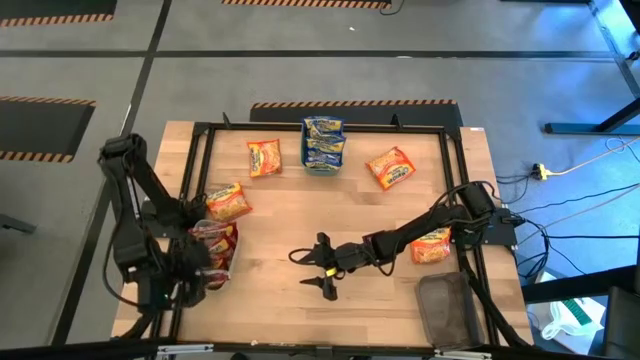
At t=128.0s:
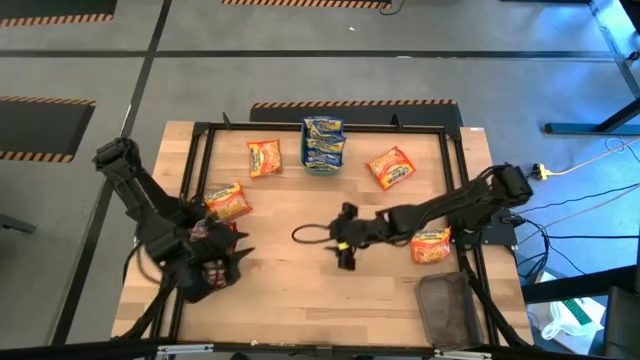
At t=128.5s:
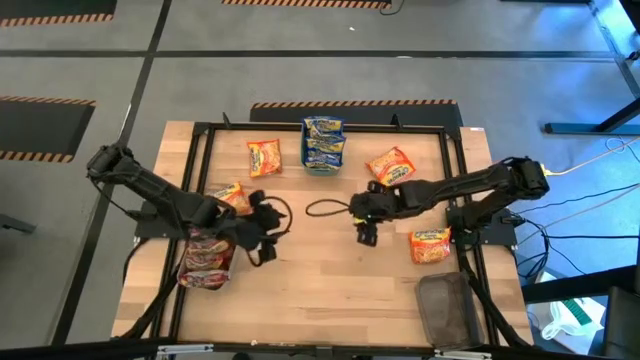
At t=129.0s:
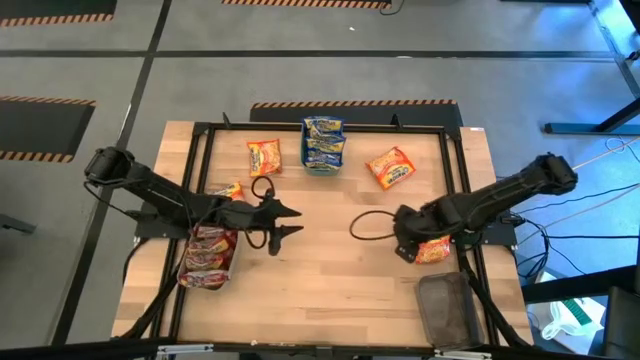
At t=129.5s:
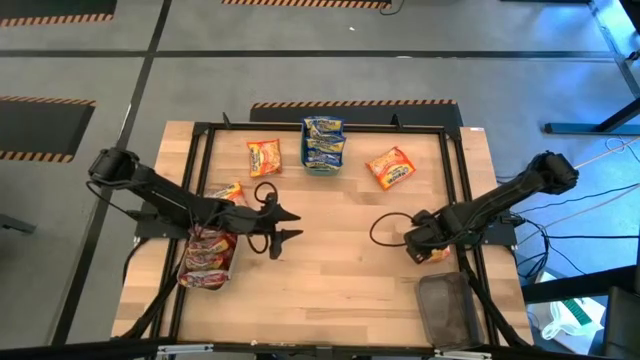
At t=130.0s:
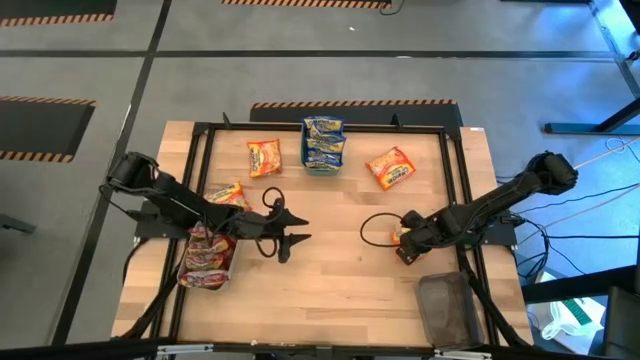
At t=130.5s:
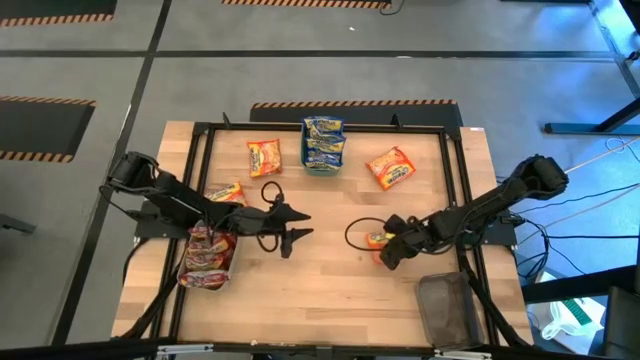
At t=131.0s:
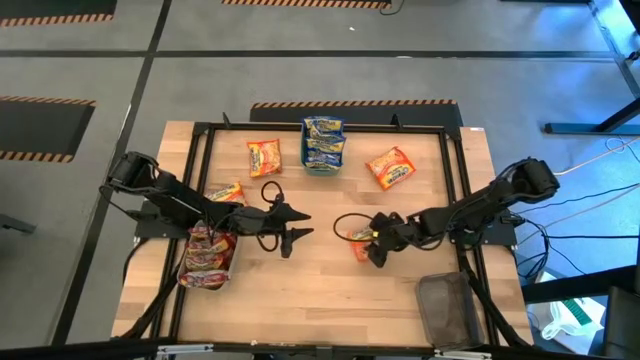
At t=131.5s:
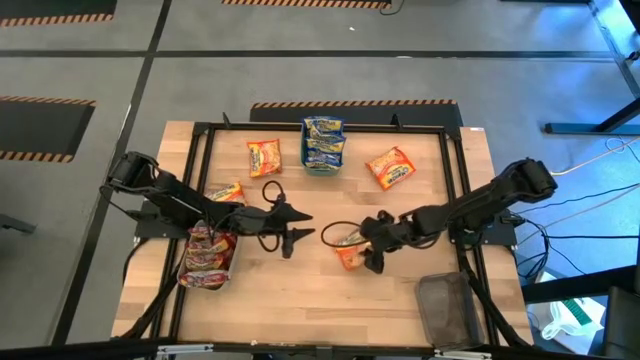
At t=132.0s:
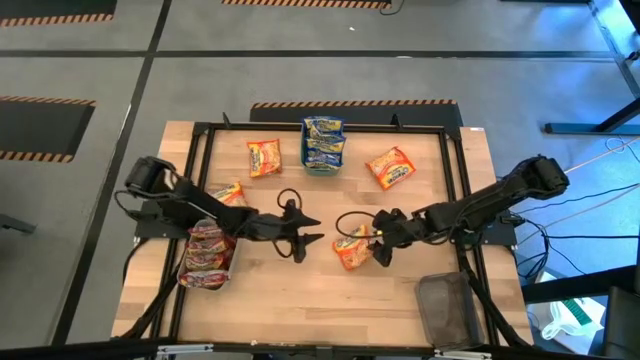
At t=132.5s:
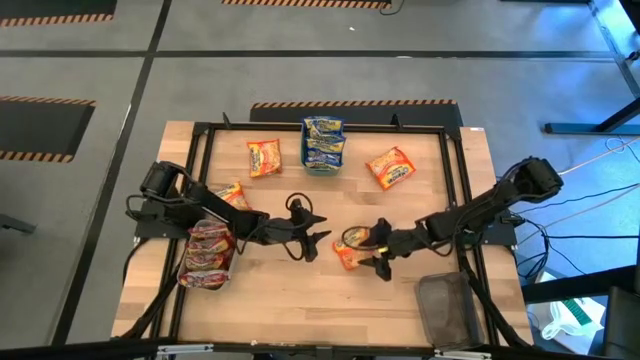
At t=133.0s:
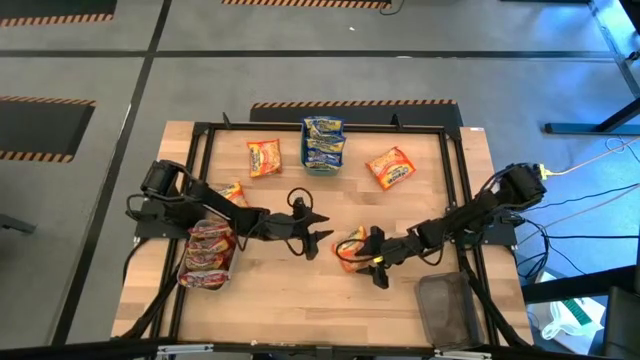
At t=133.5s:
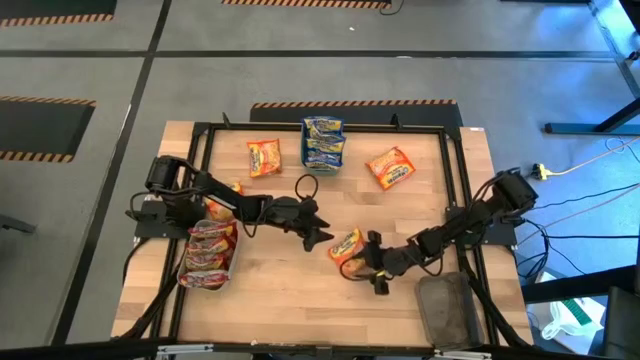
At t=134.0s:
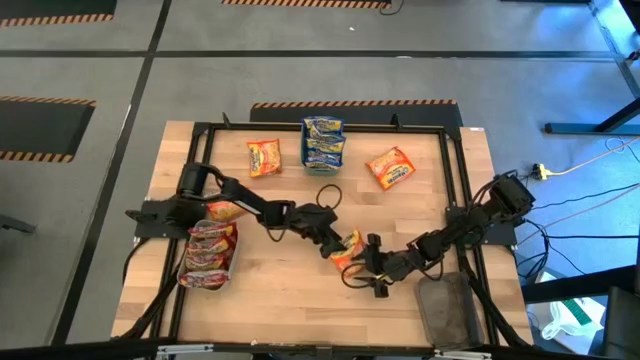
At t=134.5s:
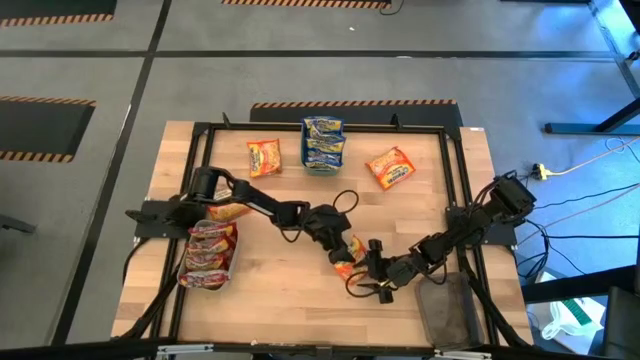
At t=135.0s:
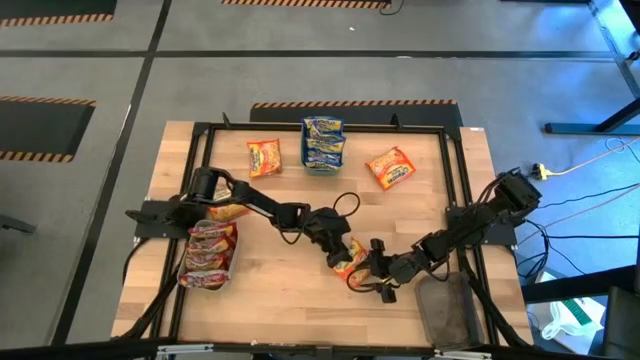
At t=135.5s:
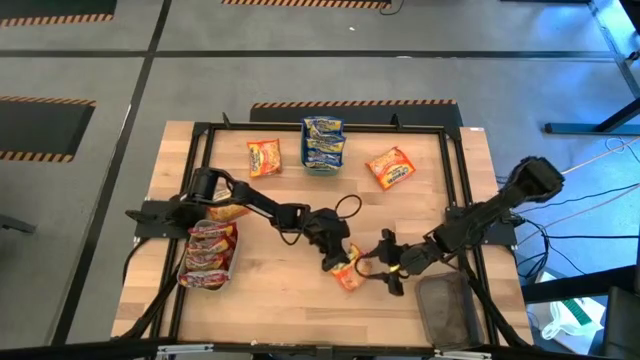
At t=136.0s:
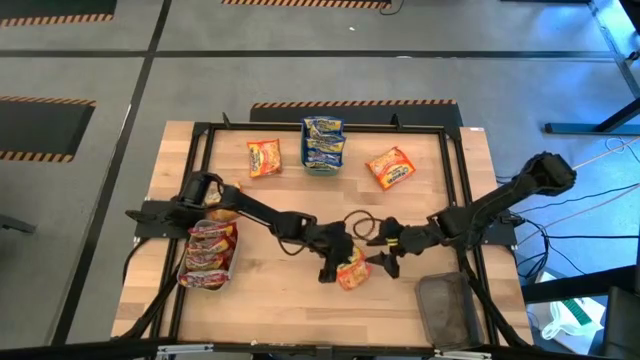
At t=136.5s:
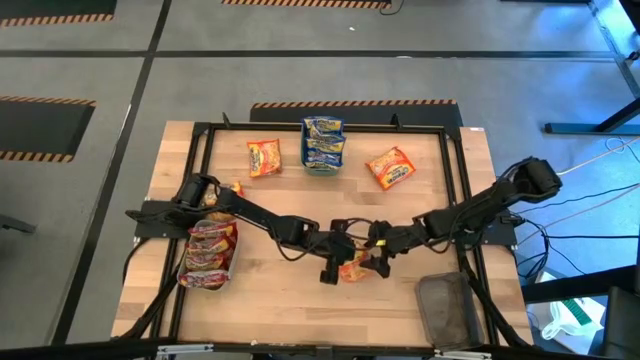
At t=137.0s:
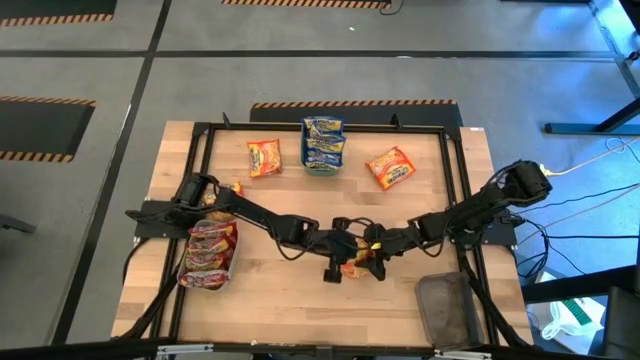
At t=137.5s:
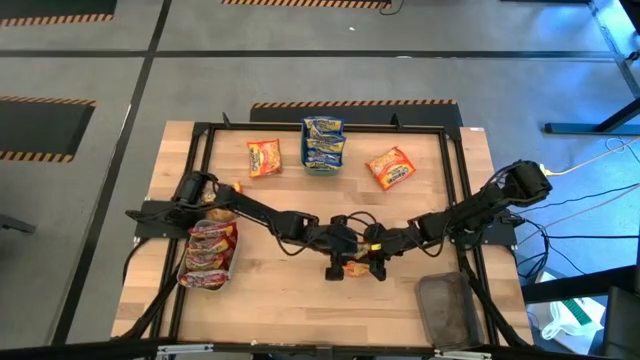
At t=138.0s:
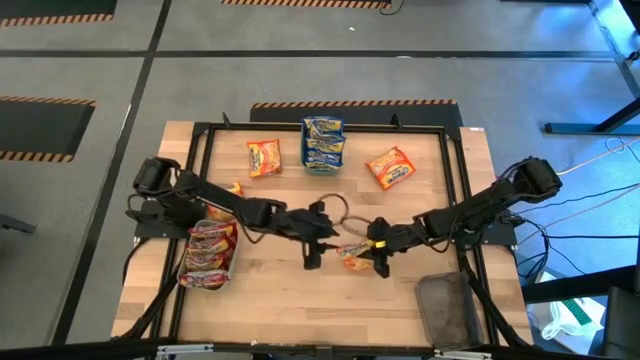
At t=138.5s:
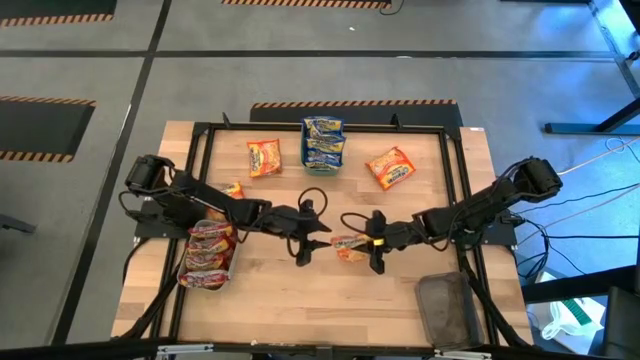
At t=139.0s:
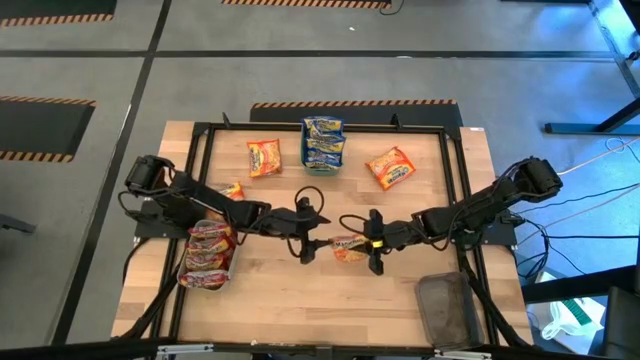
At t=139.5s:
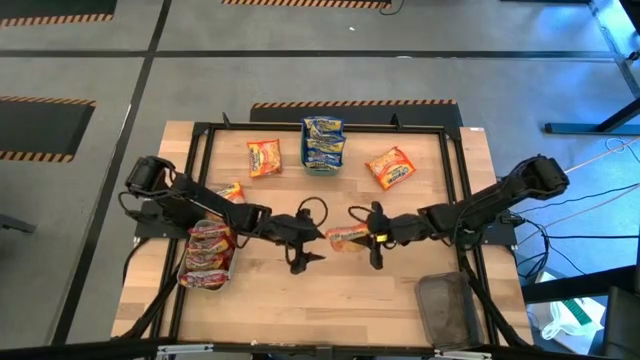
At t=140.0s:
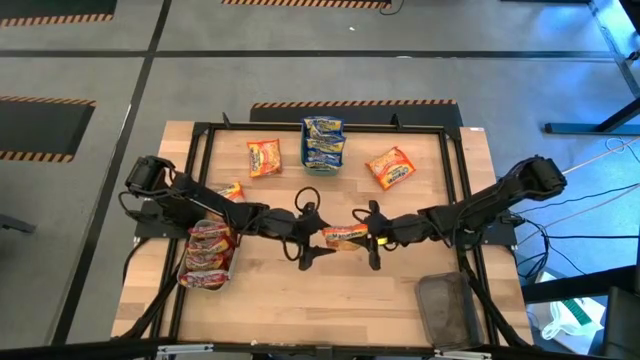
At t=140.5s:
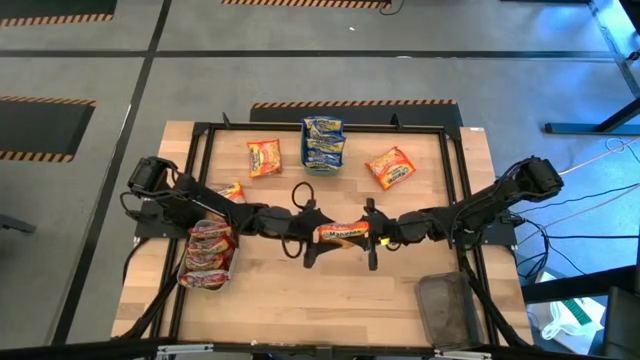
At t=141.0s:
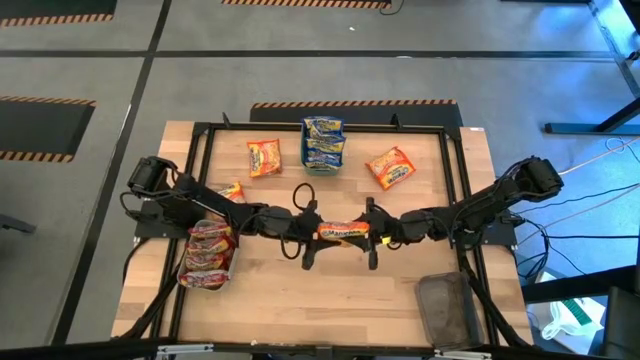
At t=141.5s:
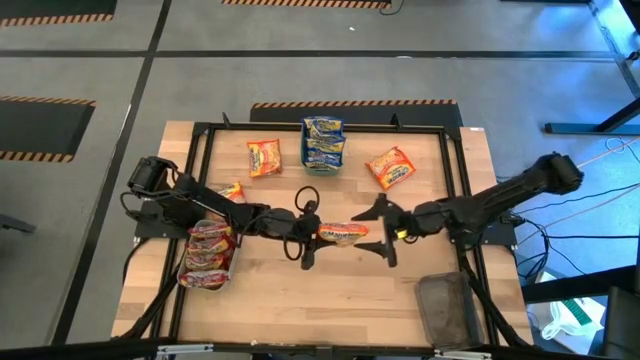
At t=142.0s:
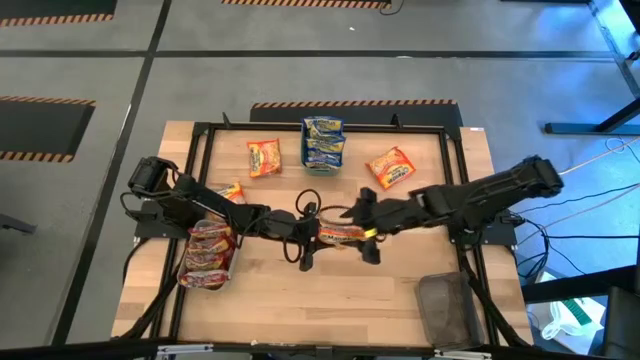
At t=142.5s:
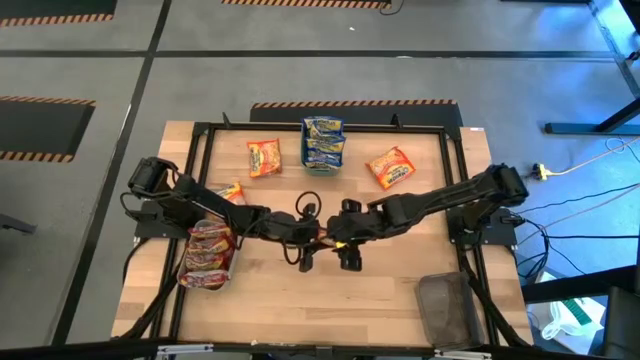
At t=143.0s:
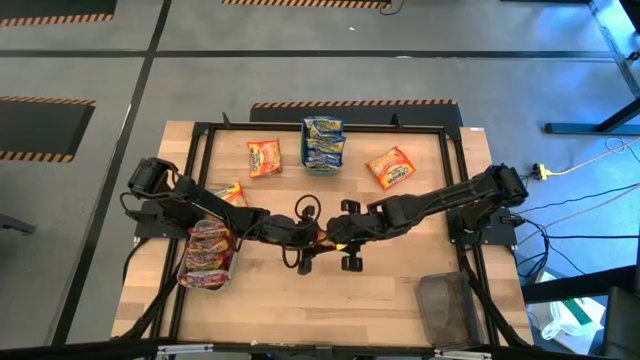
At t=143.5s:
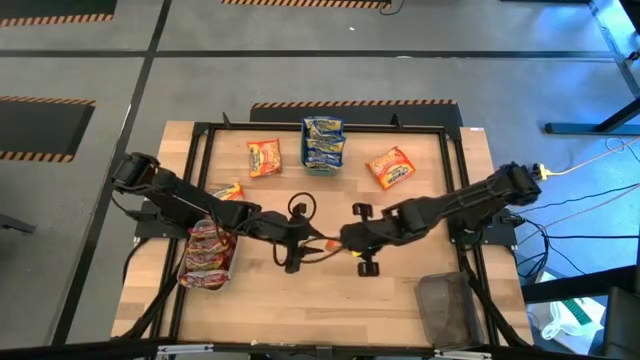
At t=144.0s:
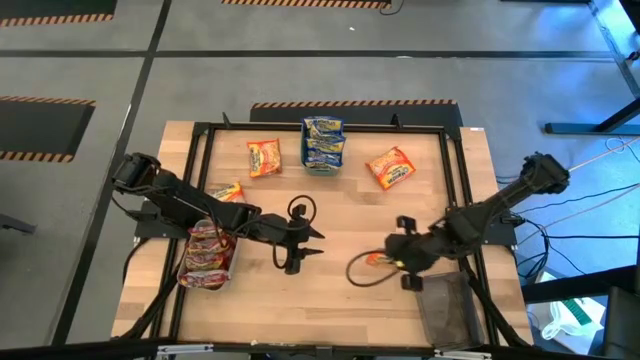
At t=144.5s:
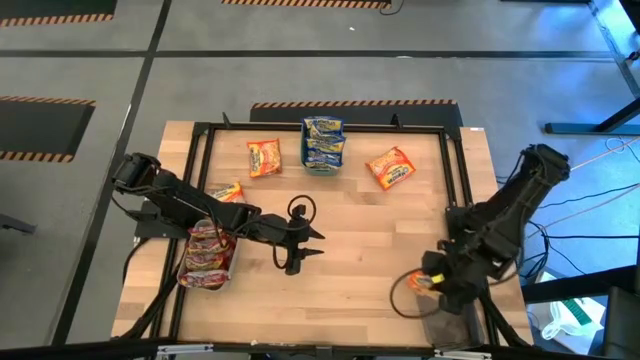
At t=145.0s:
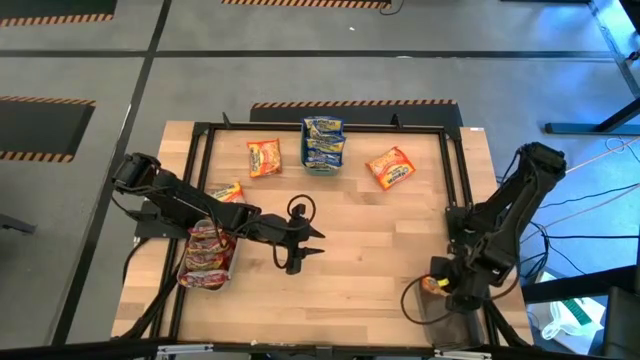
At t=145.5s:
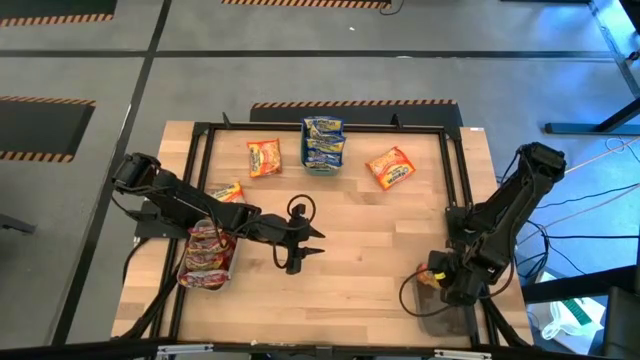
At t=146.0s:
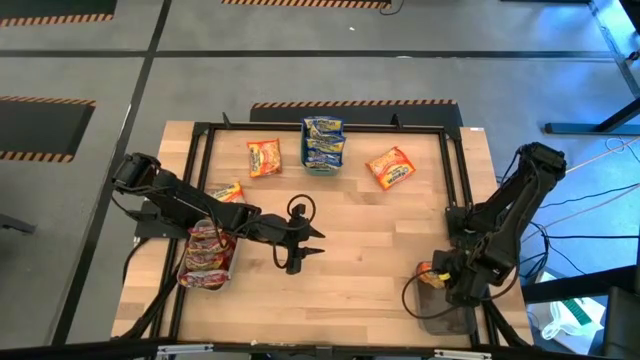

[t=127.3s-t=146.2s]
Task: Sort Maruchan noodles
Put the orange noodle pack into the black bin

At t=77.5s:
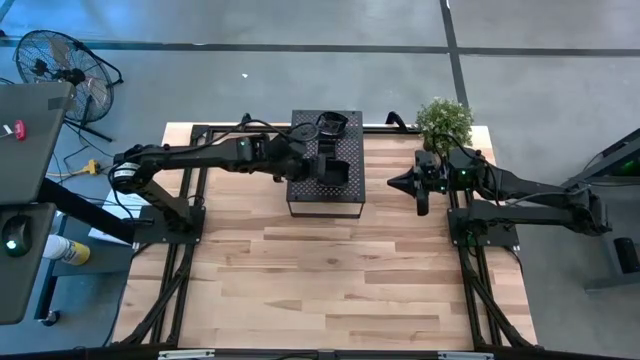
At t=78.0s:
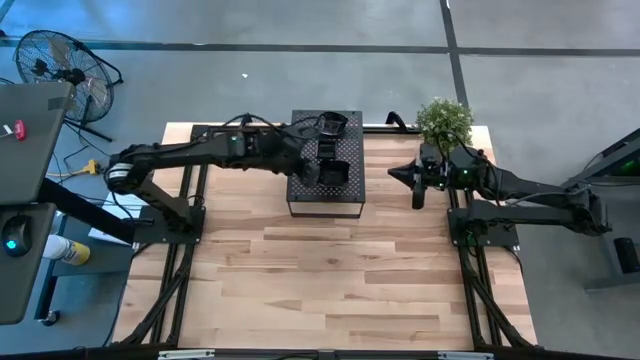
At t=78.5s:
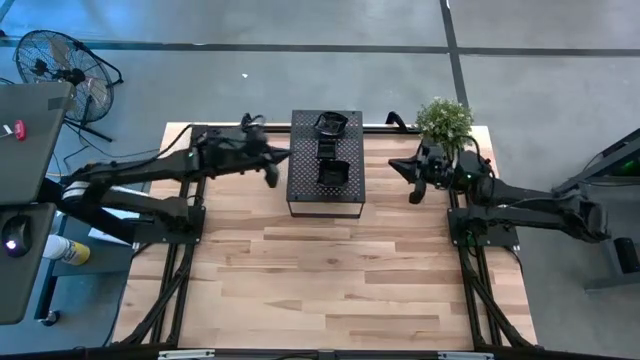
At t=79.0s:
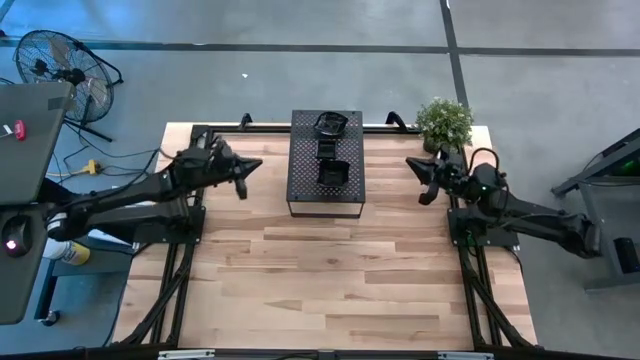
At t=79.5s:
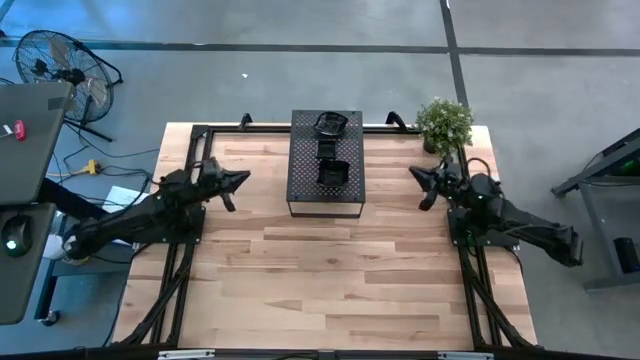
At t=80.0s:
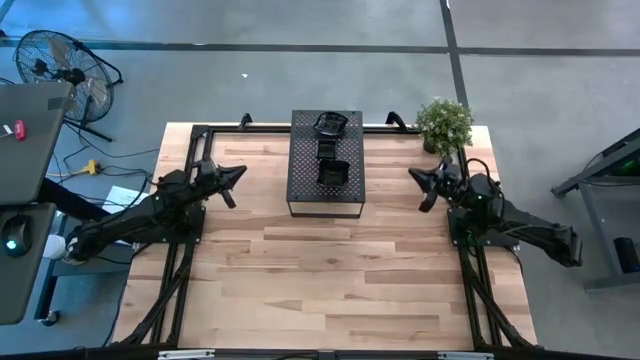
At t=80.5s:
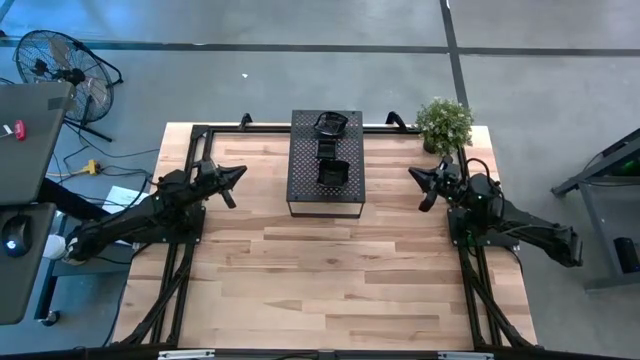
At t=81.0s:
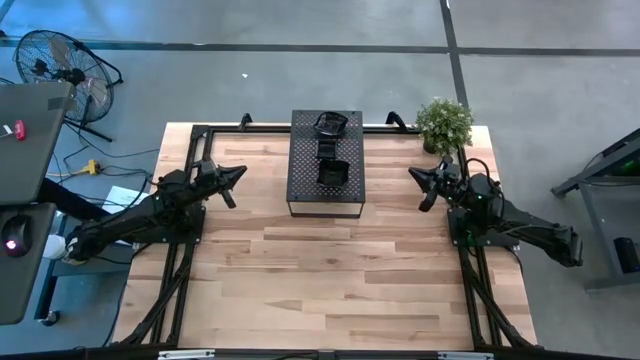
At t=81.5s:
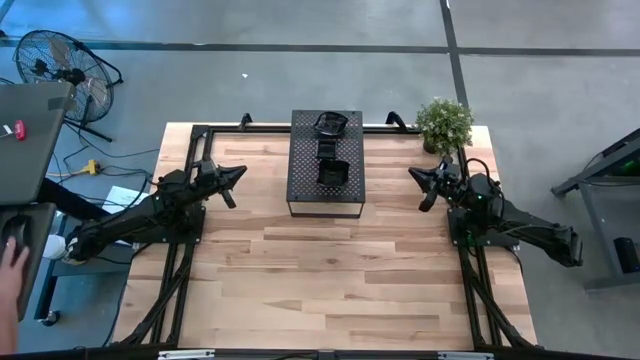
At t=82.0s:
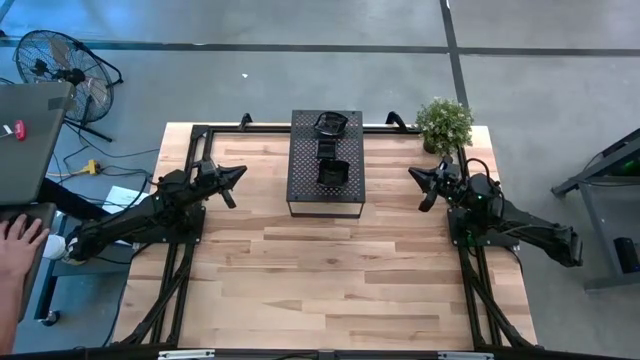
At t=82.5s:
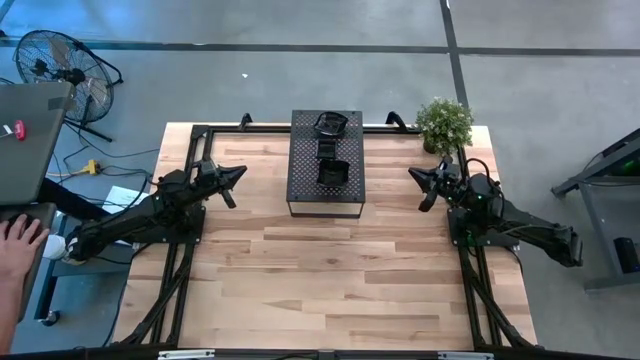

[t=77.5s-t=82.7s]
Task: Pick & Place Mini shaped plates
Return to Home Position
